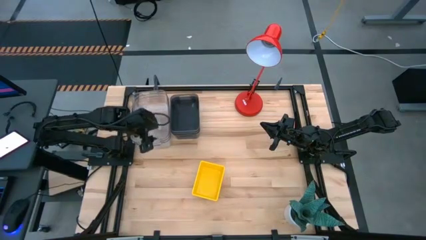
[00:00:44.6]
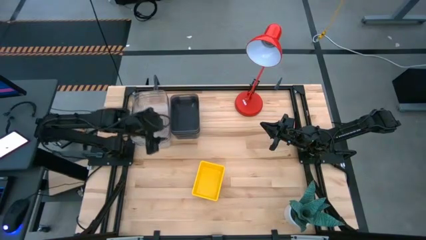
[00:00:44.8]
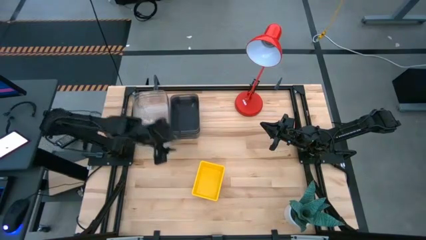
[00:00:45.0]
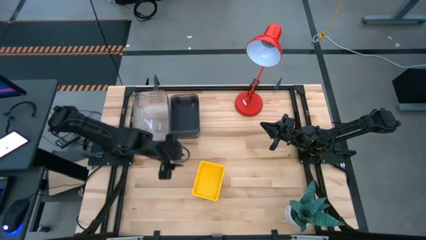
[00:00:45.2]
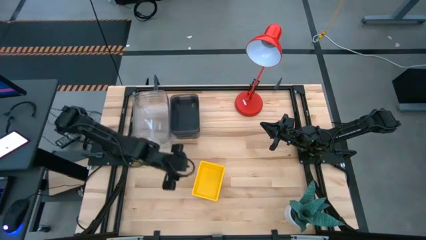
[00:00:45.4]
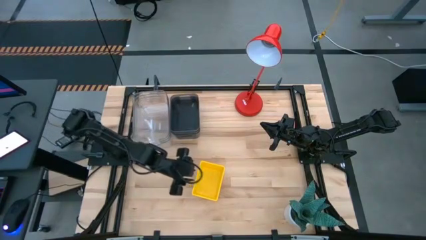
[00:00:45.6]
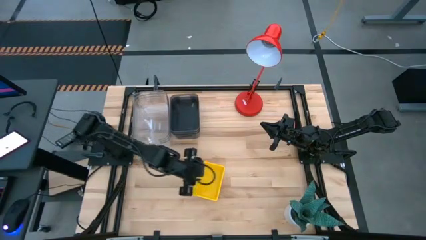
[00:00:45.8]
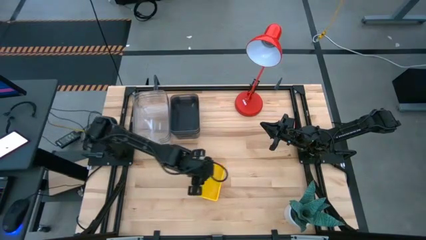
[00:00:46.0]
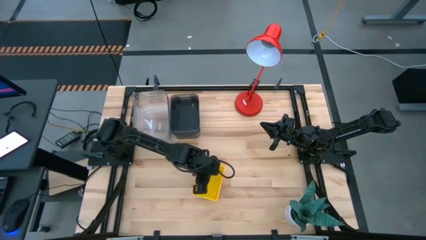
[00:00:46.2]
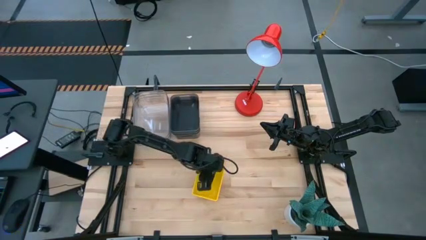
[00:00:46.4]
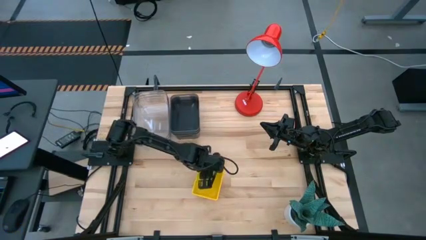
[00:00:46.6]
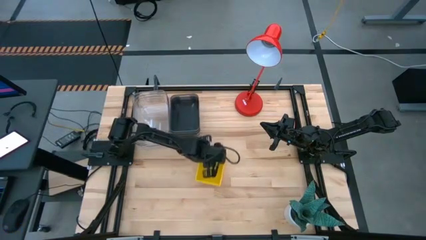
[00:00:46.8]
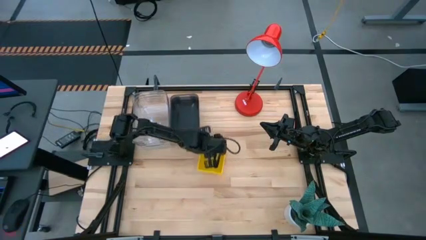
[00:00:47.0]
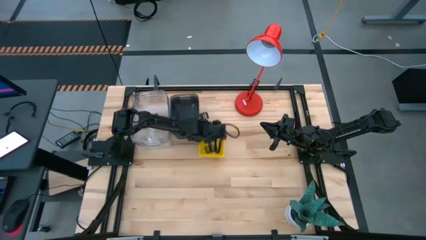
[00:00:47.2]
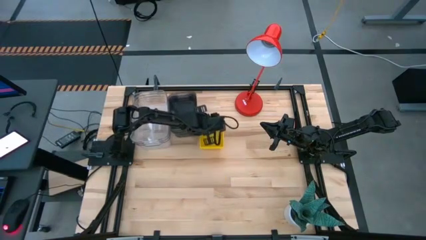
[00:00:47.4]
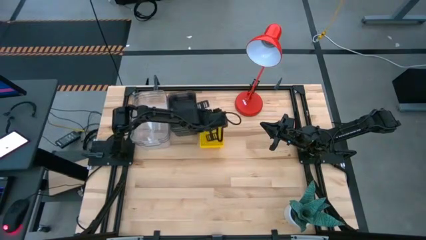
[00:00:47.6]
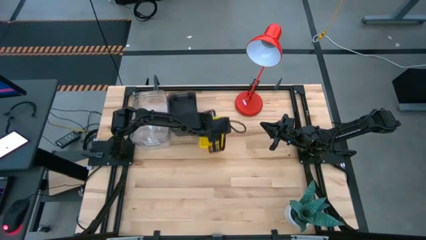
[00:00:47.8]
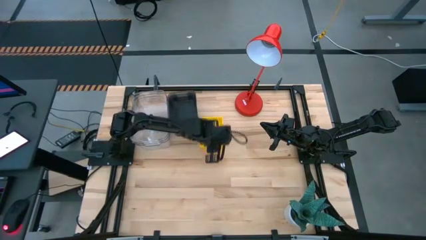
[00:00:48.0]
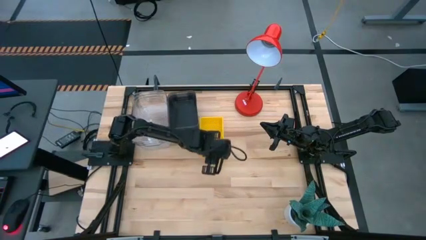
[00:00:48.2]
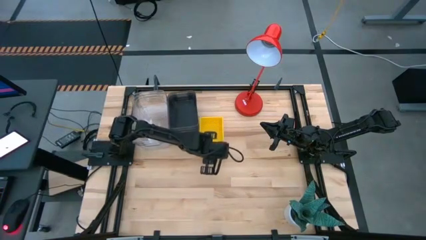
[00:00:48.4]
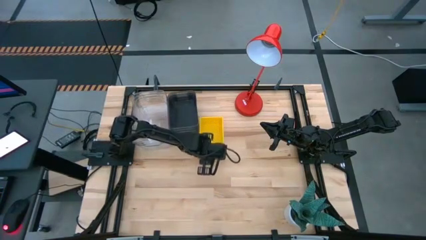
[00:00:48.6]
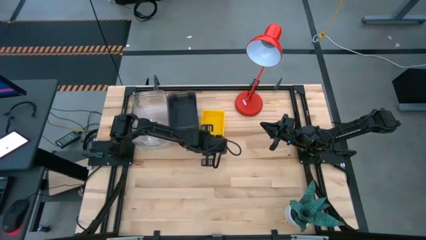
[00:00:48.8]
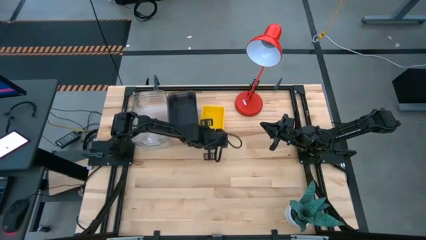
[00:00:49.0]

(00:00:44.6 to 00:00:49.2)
Move the stacked yellow bins to the top of the table

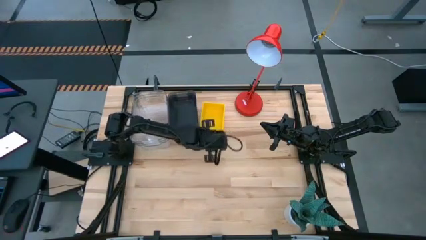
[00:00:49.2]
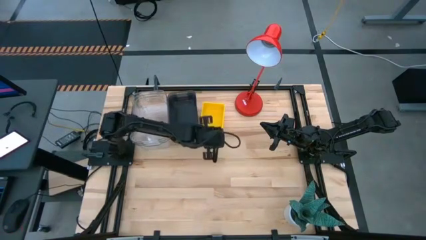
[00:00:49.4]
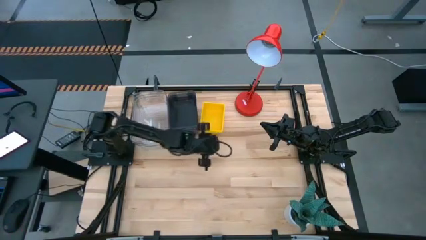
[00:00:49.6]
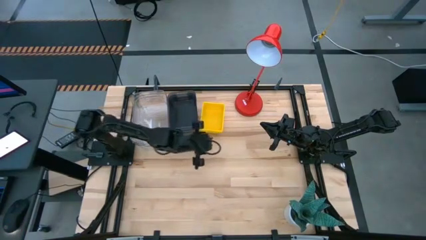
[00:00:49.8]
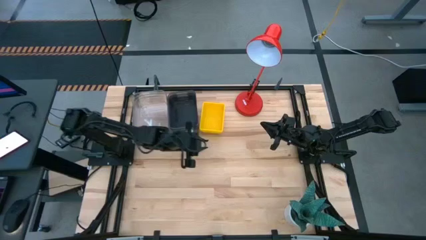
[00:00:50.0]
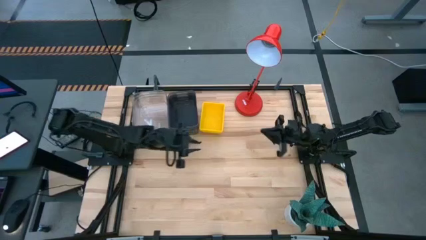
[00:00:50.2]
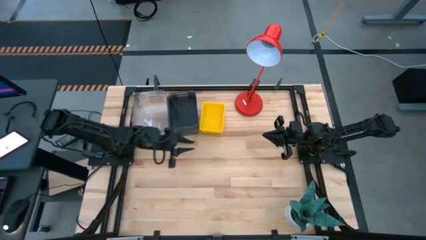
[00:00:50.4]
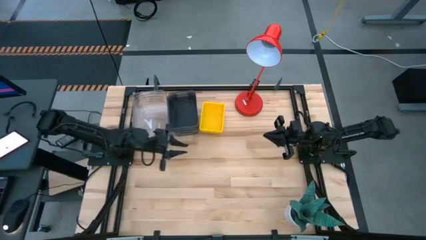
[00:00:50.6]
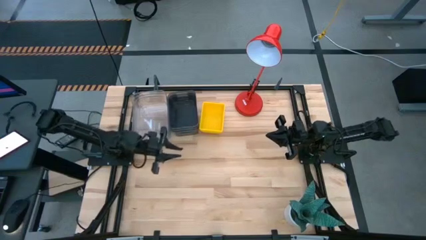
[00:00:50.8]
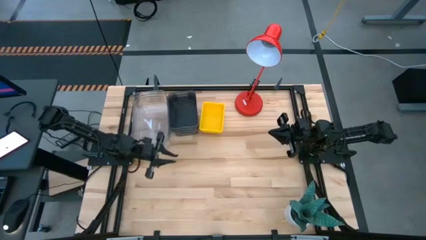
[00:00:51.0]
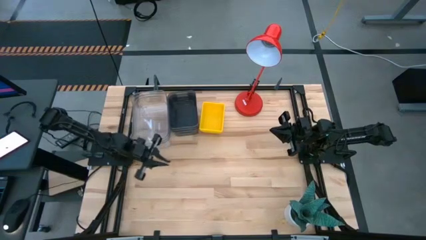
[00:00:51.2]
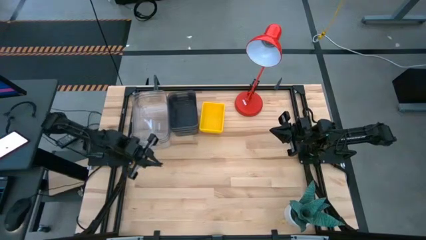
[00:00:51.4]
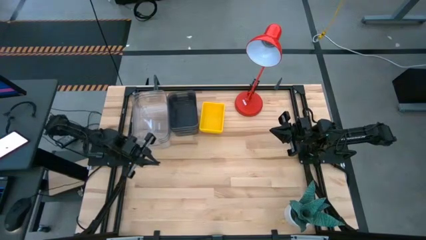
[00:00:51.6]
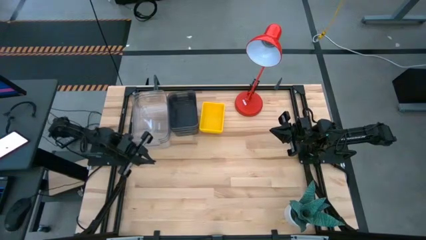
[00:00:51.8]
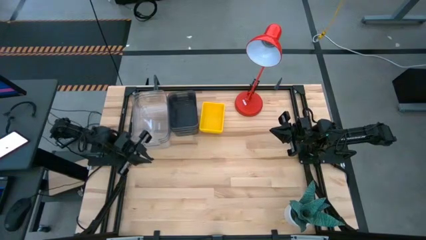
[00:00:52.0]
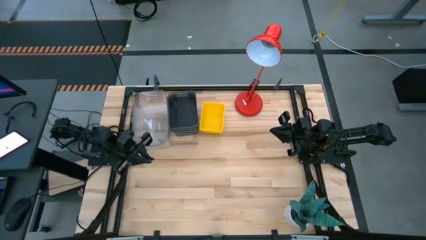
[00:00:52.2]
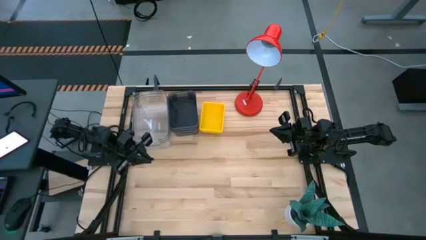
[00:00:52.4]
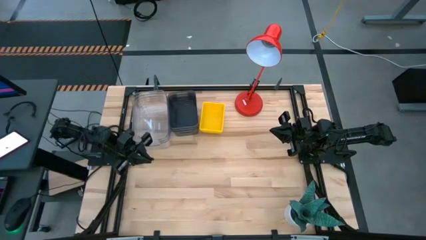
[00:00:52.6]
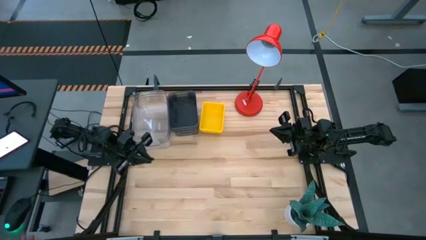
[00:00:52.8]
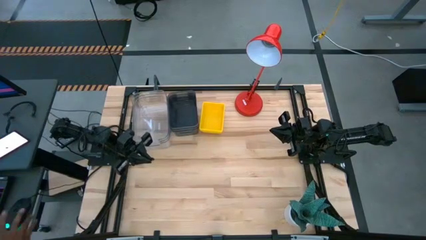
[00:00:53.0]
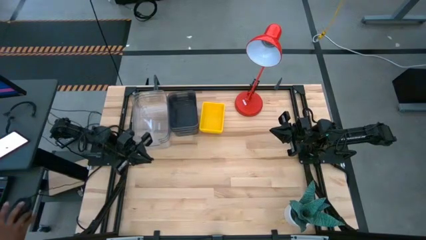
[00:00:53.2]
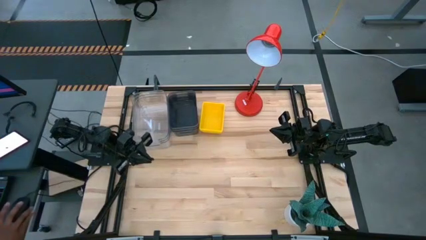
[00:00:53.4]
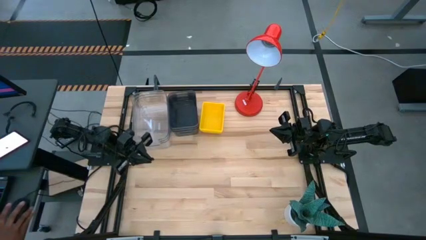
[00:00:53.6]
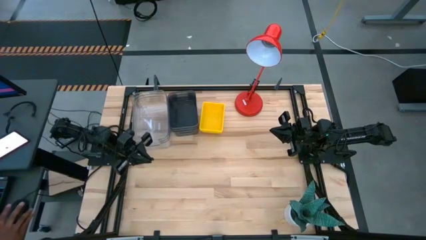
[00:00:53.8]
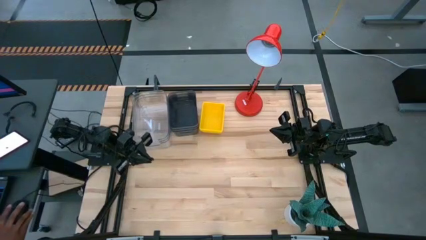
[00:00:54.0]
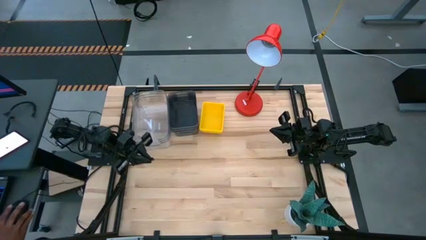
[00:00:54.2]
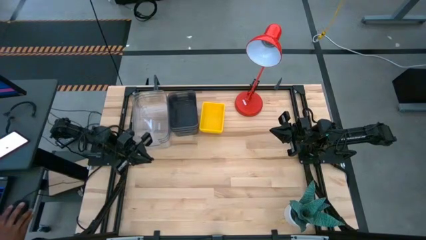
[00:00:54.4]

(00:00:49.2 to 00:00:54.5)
Return to Home Position

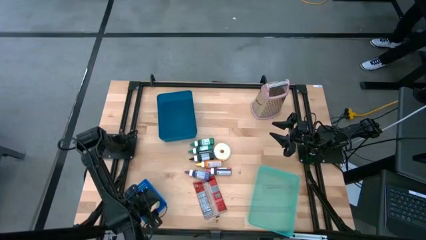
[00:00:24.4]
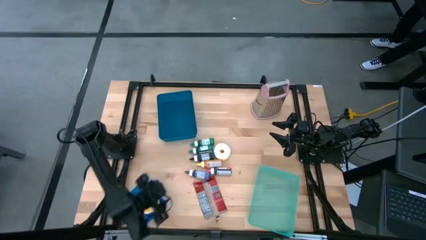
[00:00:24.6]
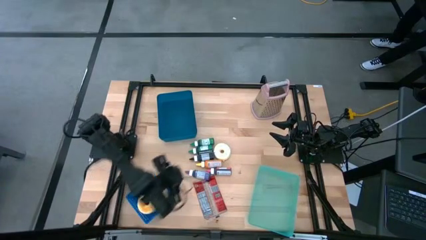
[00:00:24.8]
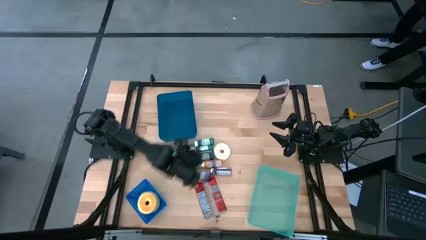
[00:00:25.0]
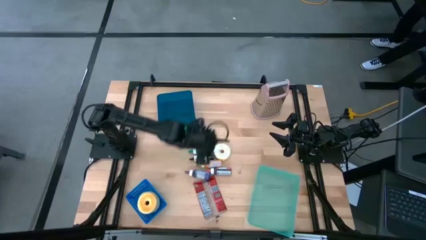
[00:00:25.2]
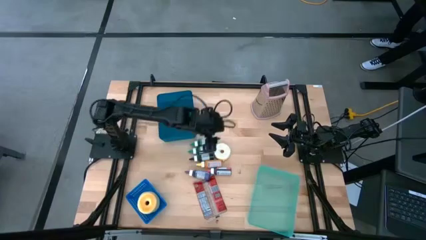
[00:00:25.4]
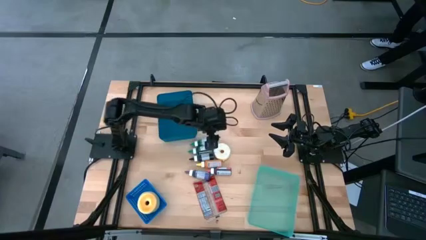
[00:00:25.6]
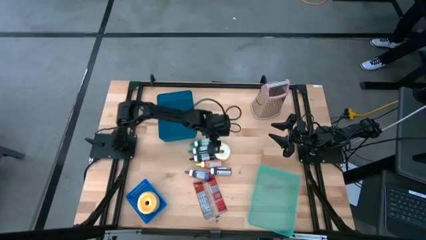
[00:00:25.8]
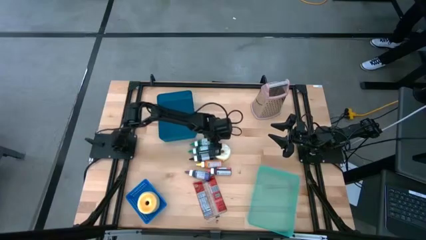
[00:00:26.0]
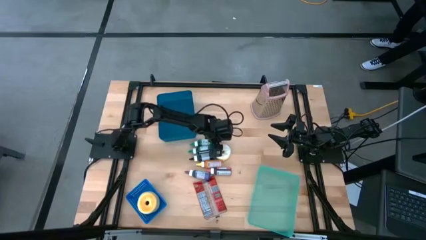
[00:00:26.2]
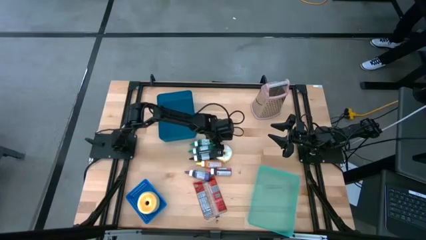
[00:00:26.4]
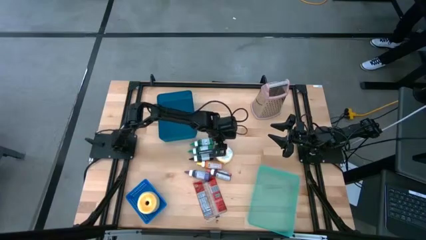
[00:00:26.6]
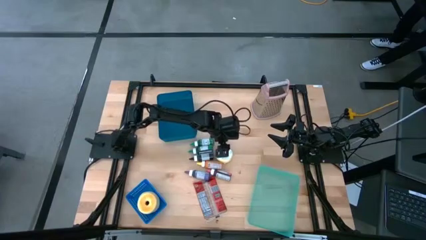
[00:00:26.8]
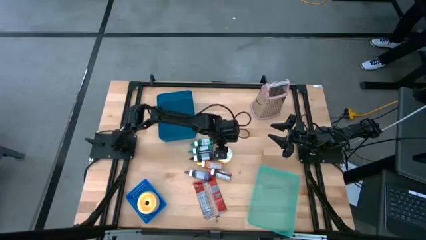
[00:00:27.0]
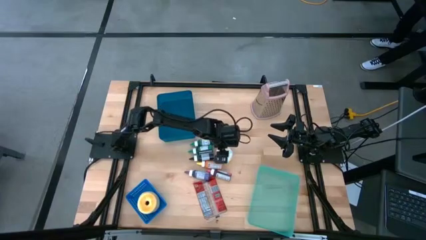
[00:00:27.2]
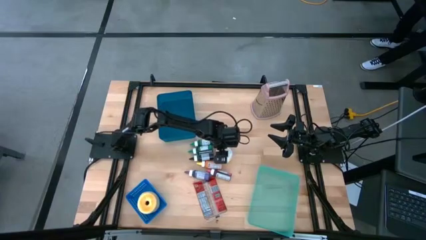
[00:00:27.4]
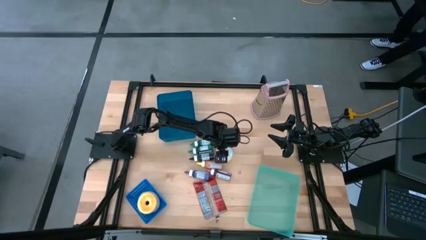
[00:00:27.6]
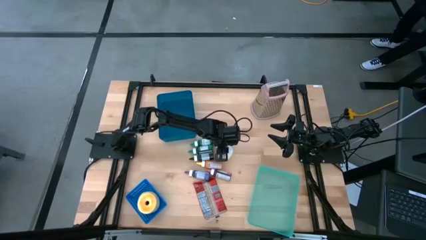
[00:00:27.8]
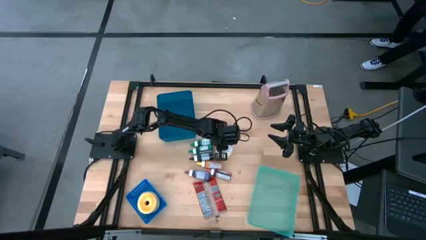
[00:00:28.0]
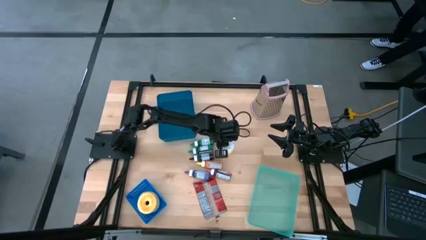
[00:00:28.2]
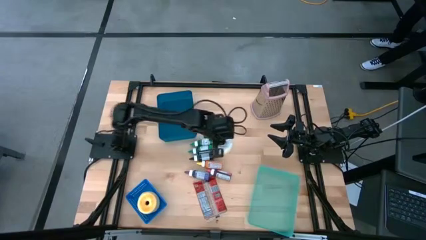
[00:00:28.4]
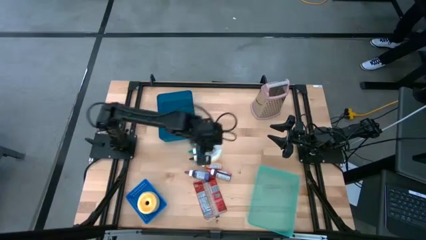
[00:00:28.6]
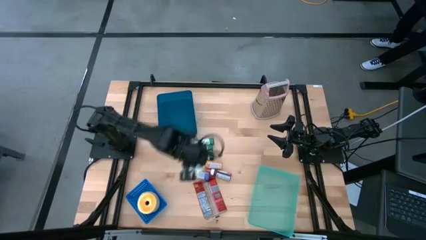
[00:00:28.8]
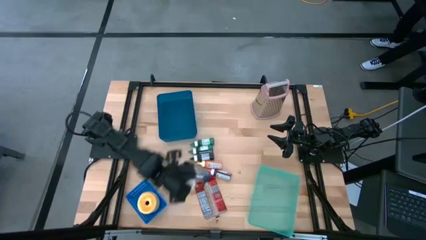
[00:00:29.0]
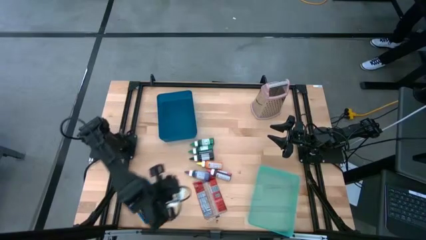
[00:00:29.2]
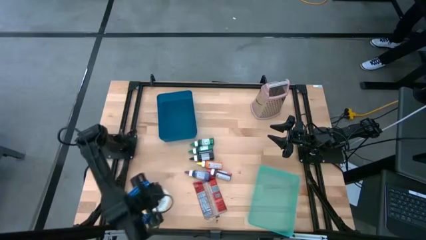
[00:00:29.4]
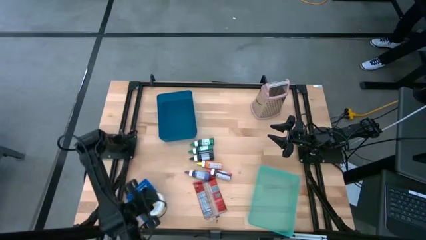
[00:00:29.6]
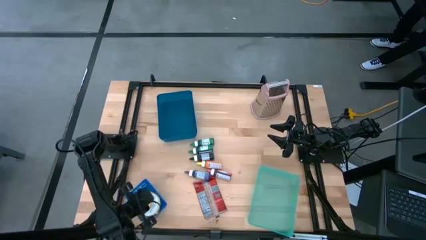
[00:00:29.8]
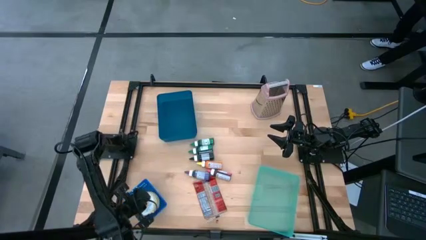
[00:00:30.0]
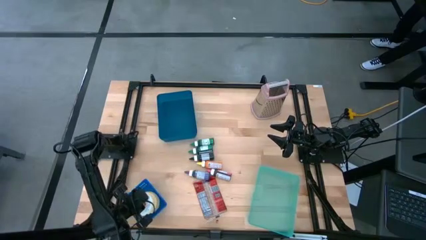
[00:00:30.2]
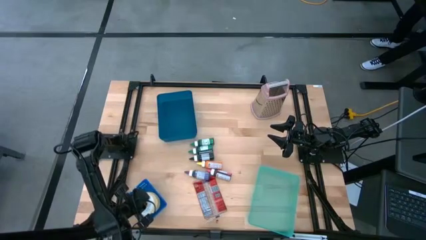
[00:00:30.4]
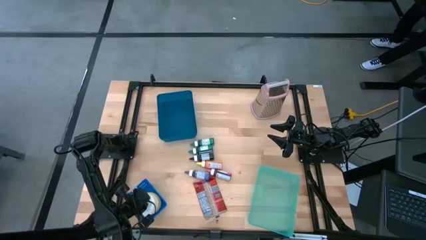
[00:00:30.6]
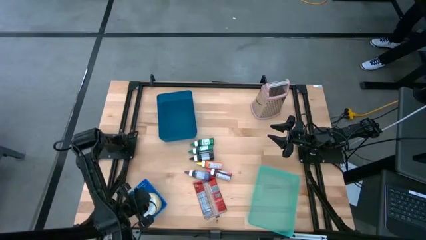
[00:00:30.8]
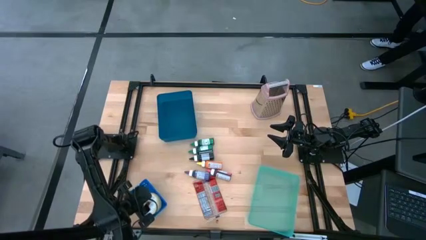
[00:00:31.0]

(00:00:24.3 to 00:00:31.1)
Put the white donut into the blue bin
